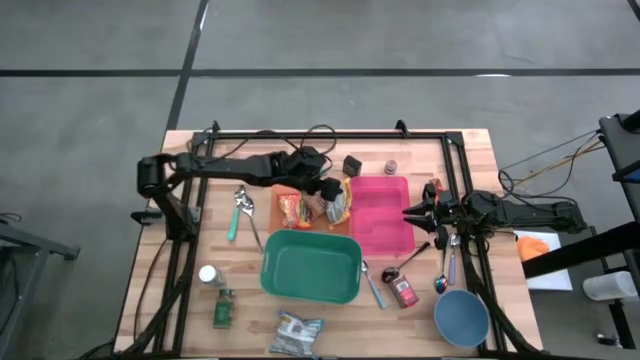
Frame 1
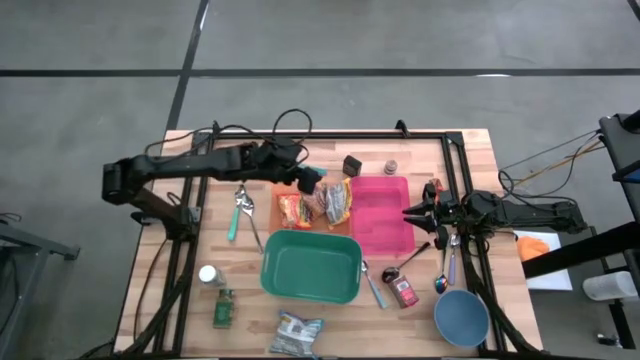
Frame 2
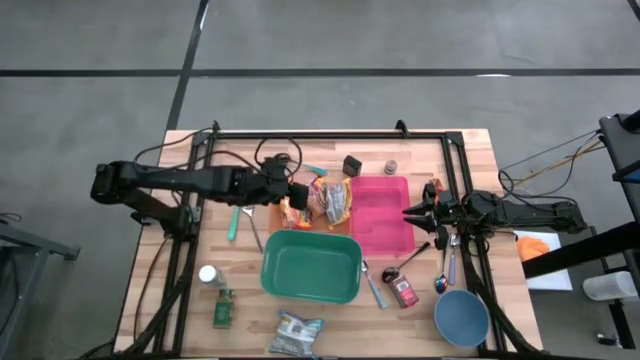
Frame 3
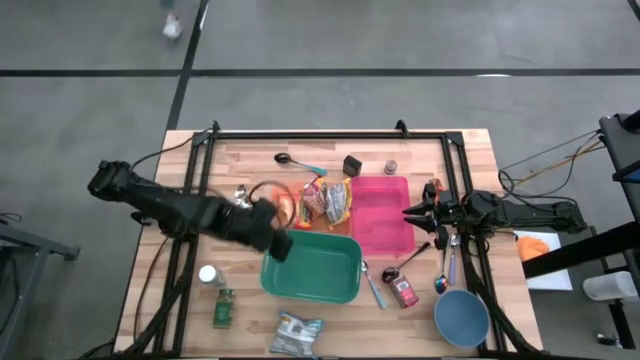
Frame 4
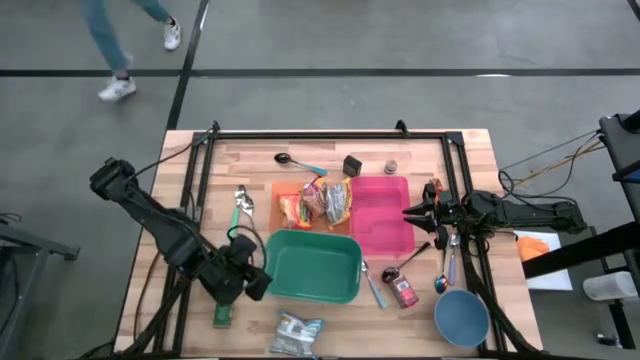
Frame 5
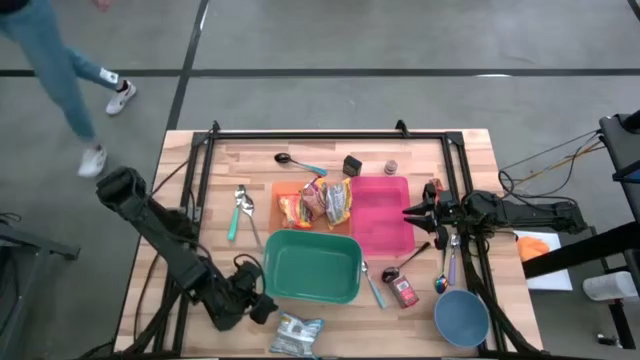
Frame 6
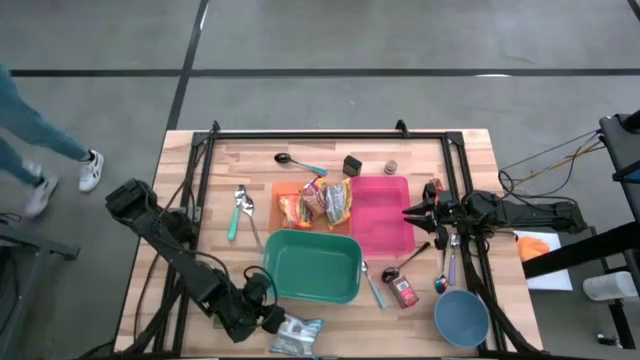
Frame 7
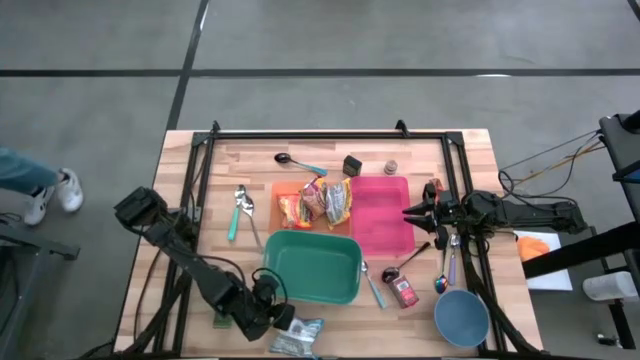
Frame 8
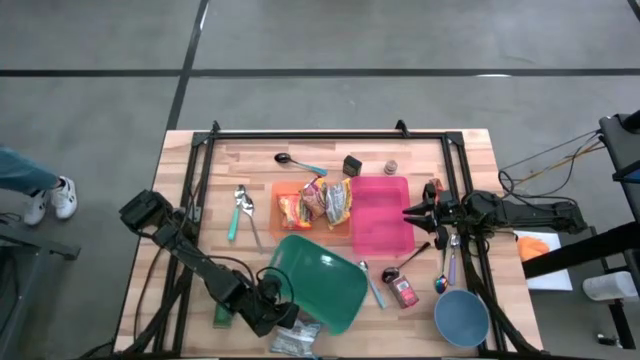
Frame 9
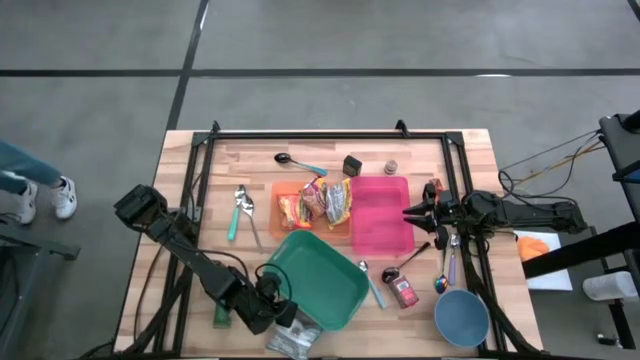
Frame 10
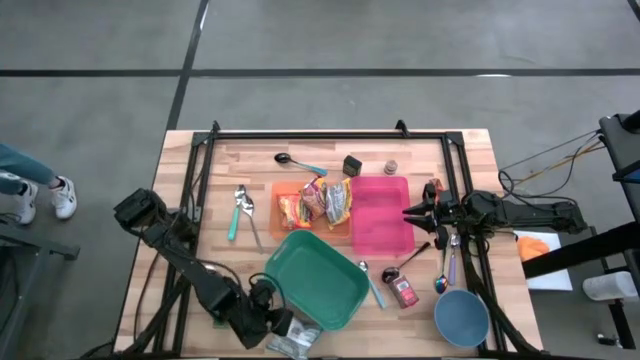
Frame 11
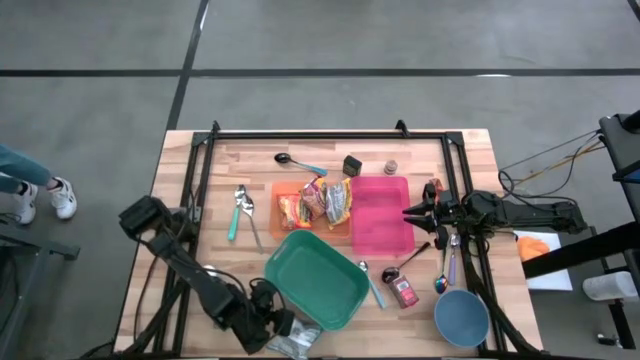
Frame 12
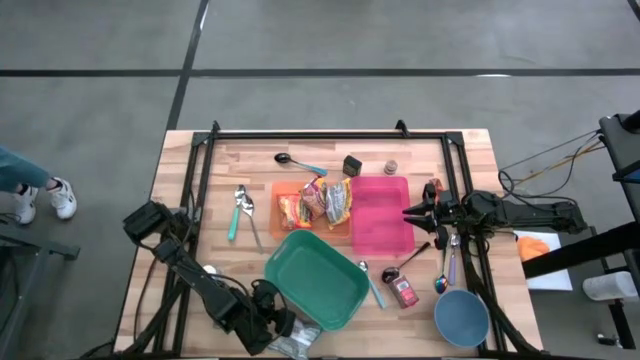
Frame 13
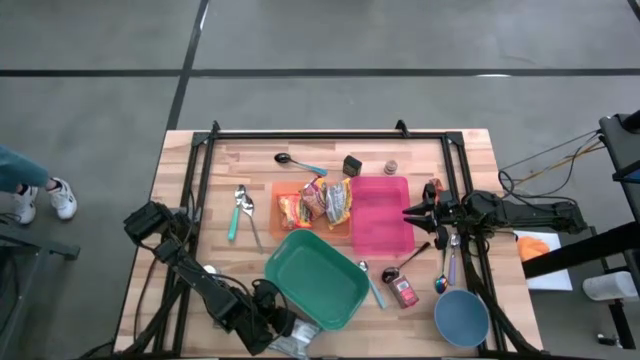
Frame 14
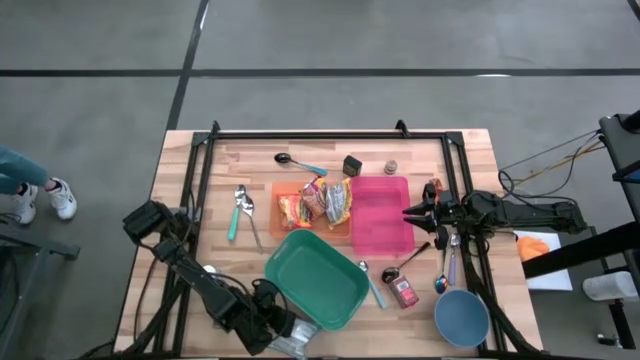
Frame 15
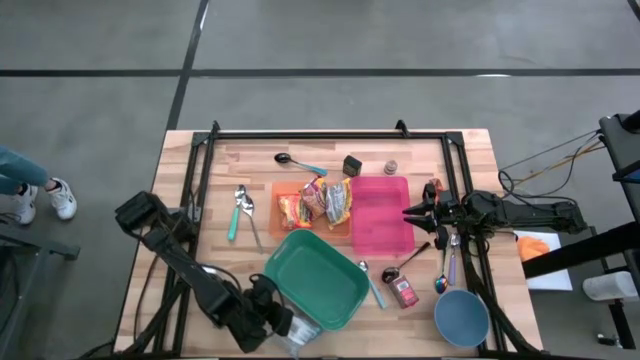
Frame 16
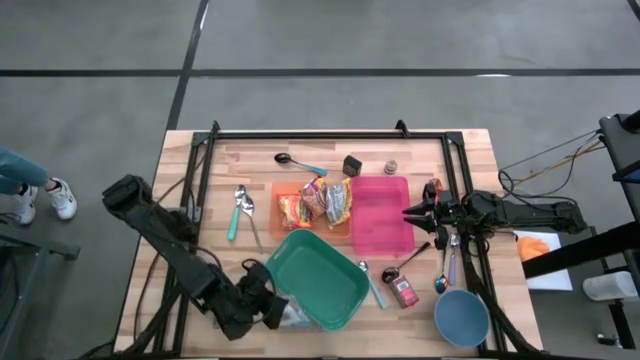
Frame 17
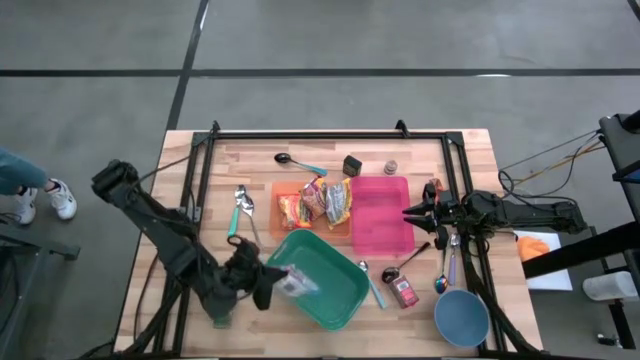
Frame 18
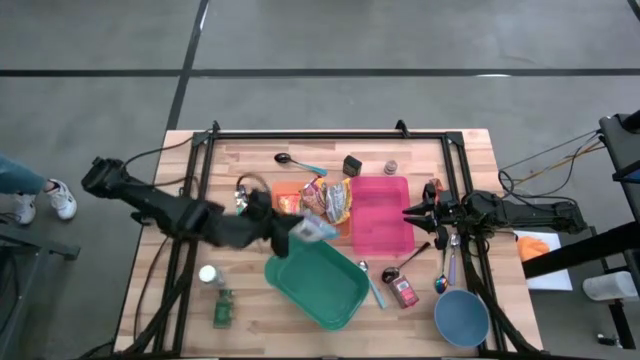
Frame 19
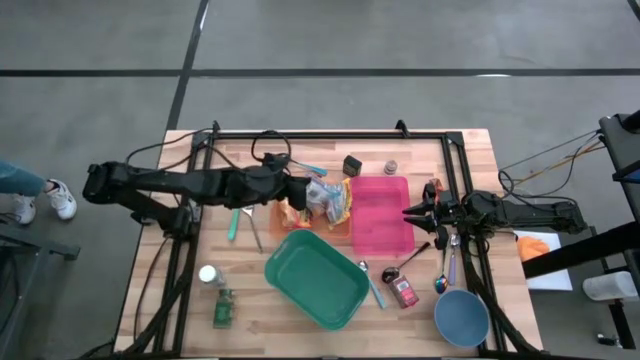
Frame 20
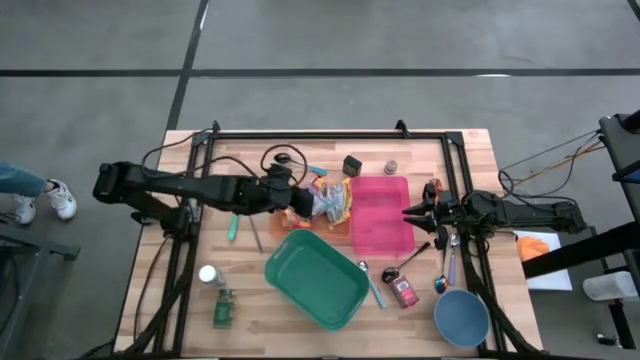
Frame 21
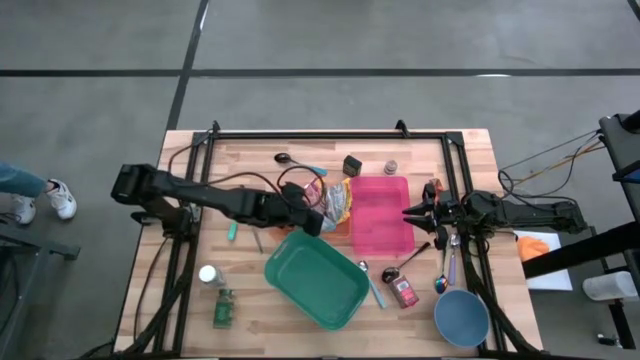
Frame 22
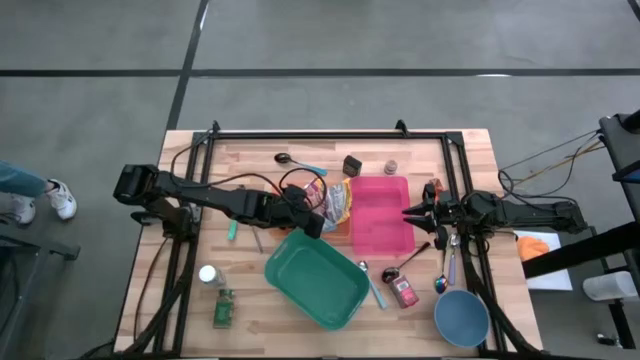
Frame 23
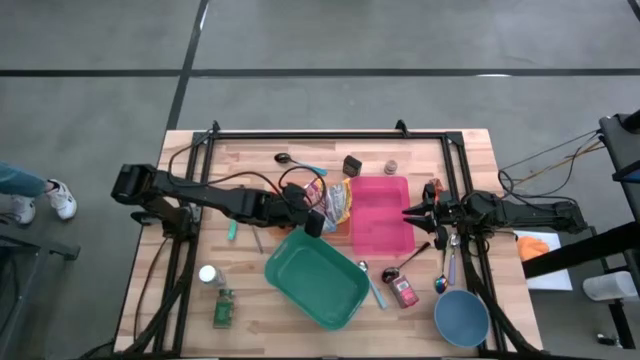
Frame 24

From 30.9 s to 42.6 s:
Put the blue noodle pack into the orange bin

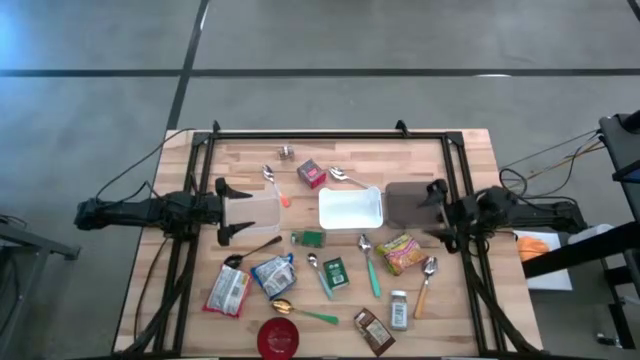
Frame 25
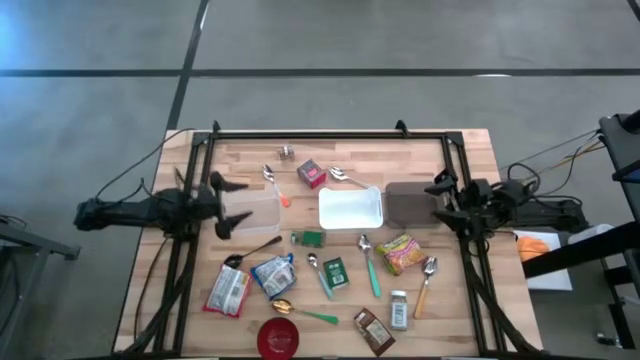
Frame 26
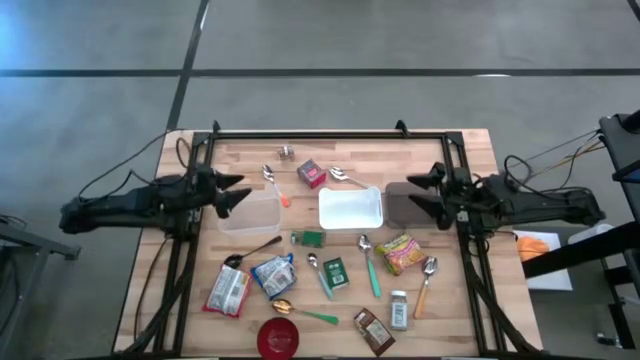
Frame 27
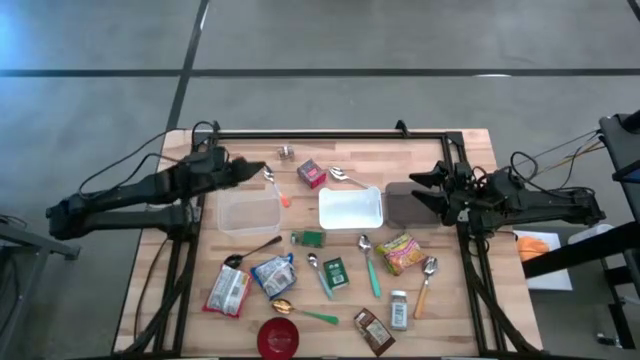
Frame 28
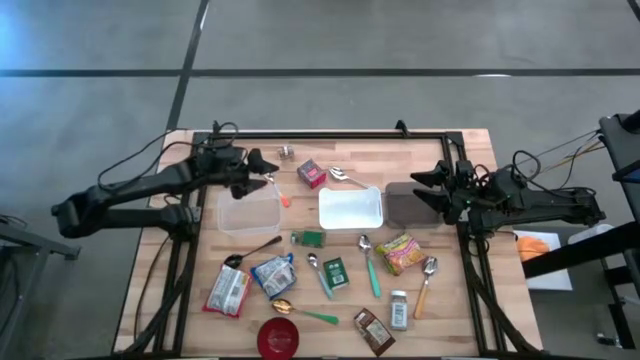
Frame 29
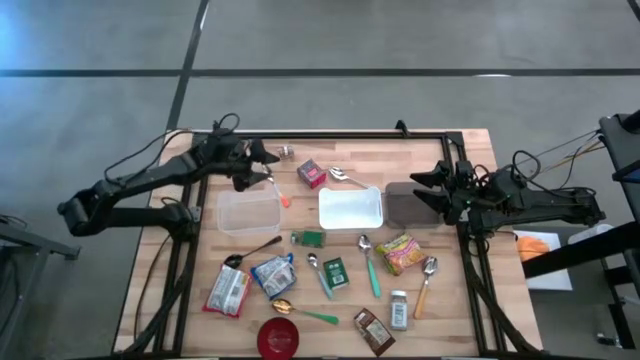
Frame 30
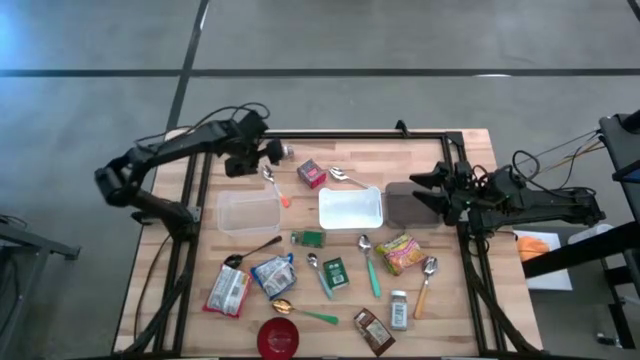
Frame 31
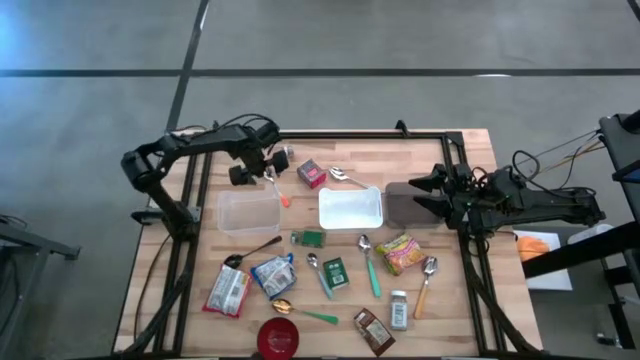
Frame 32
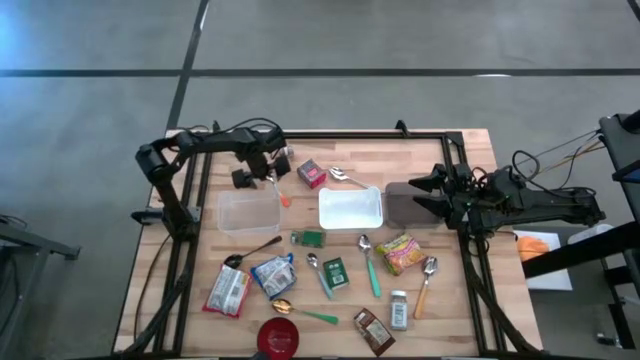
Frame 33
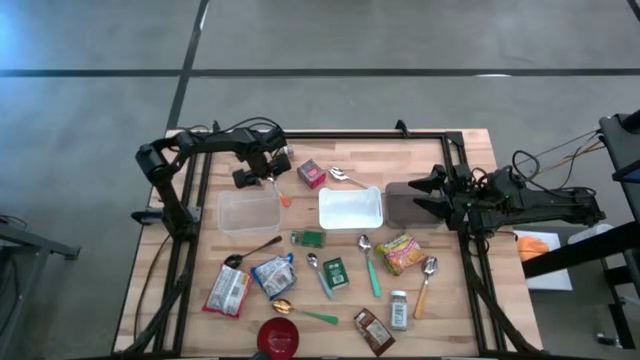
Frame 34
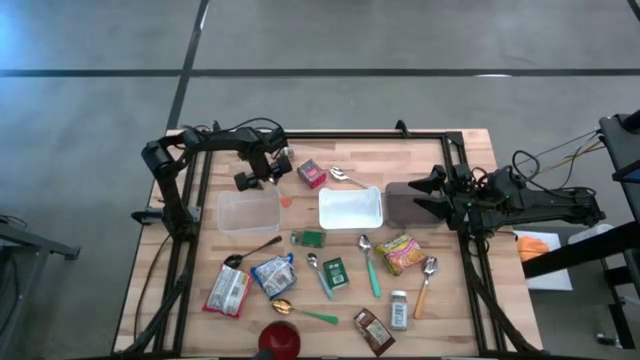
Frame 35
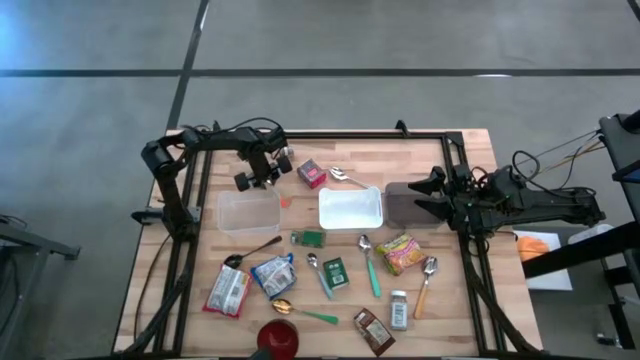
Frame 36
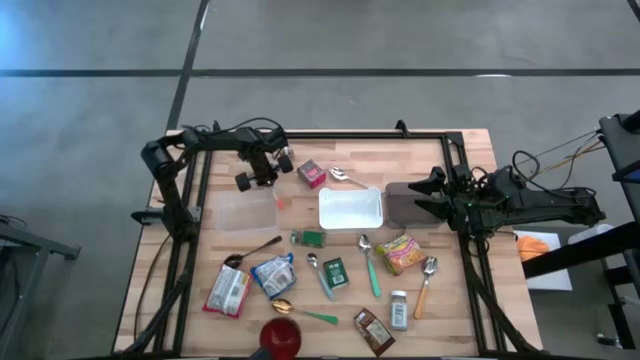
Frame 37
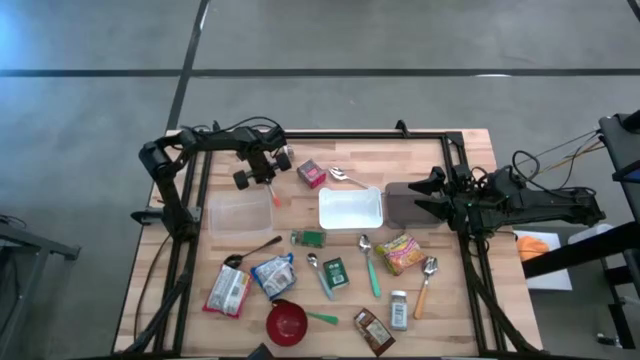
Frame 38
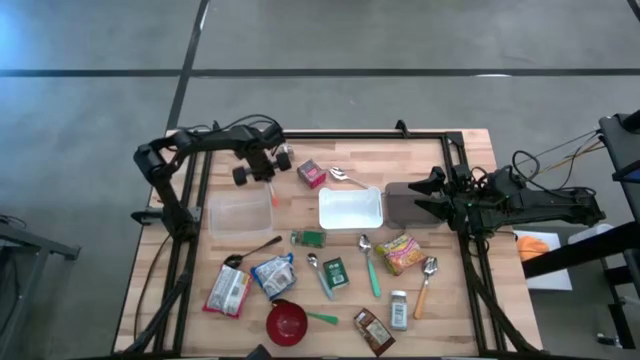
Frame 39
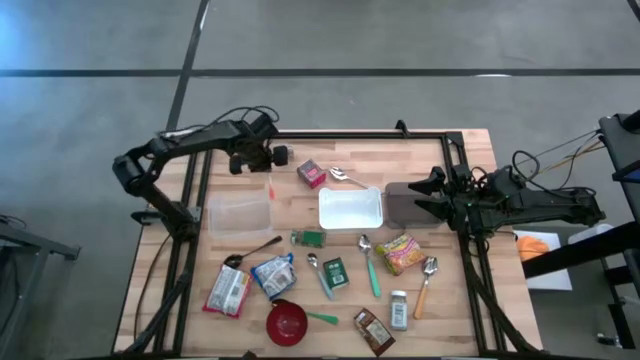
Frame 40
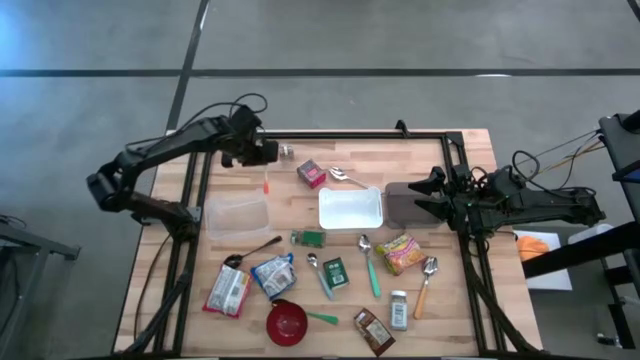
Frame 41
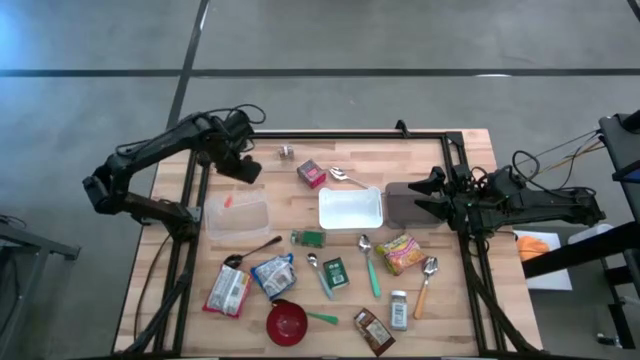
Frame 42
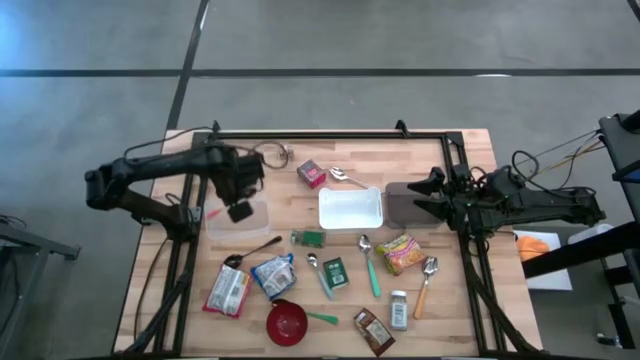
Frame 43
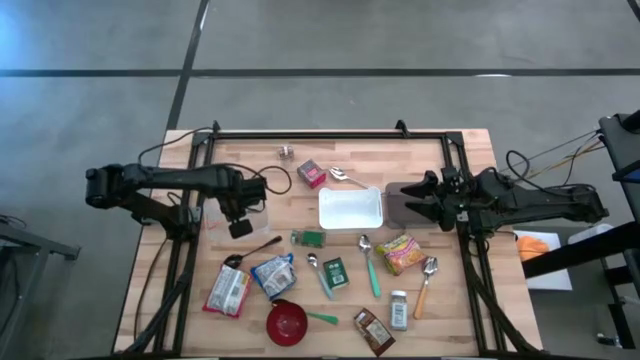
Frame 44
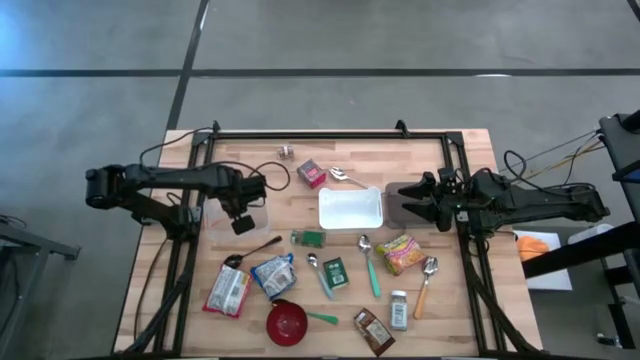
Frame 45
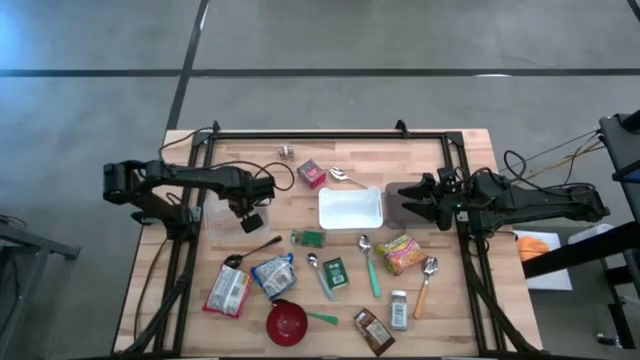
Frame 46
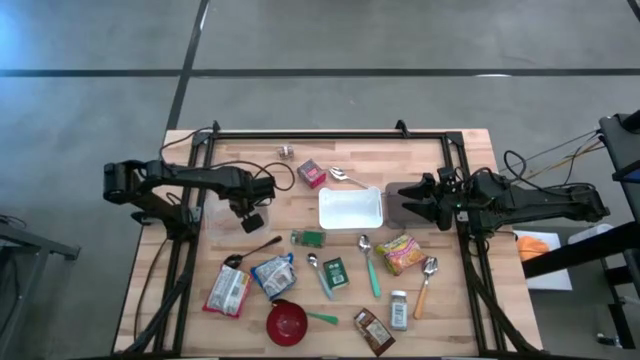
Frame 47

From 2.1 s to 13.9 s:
Put the orange spoon into the transparent bin
